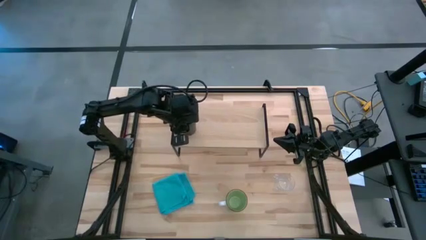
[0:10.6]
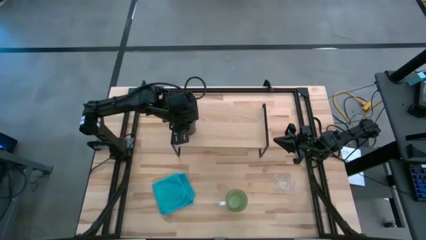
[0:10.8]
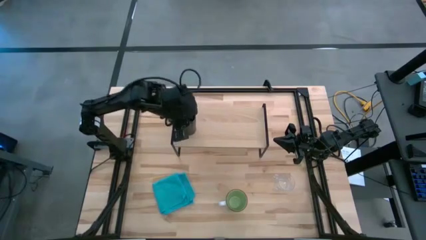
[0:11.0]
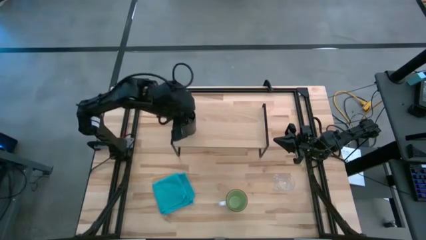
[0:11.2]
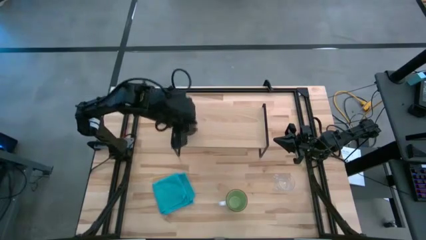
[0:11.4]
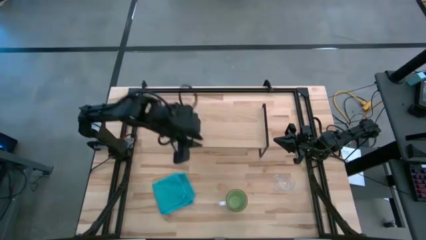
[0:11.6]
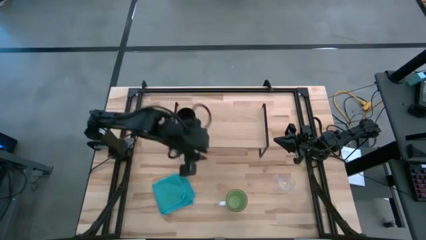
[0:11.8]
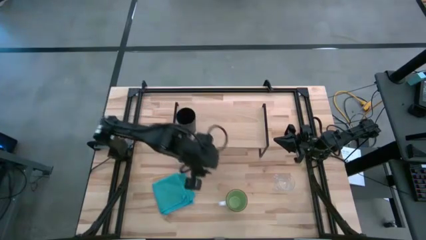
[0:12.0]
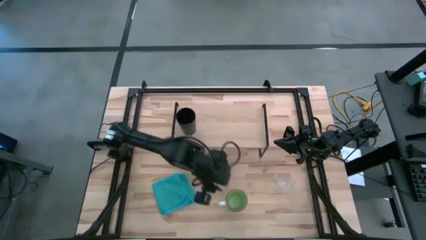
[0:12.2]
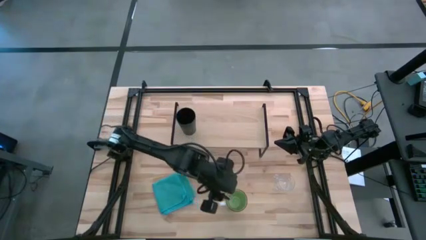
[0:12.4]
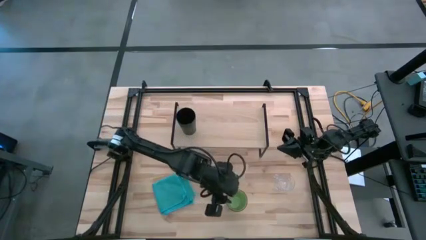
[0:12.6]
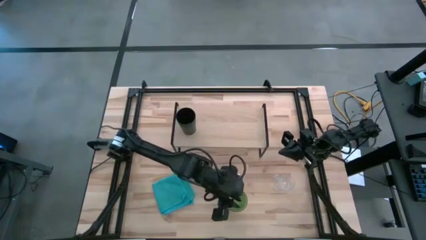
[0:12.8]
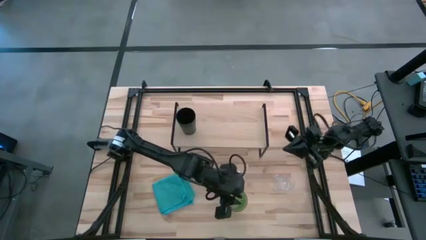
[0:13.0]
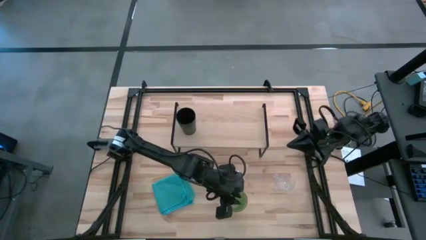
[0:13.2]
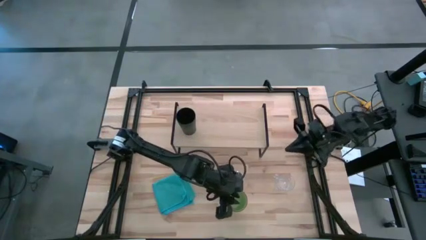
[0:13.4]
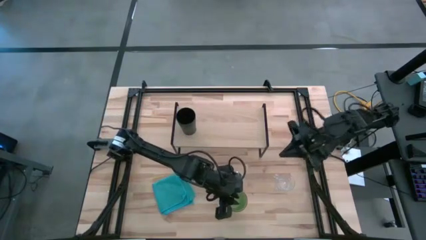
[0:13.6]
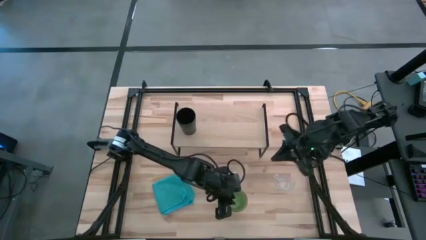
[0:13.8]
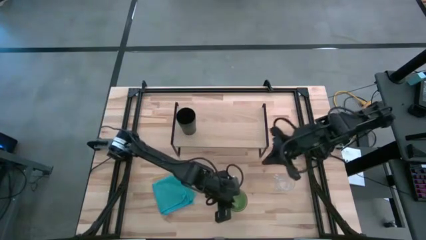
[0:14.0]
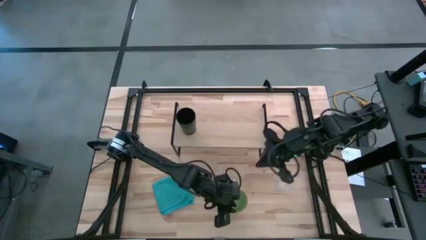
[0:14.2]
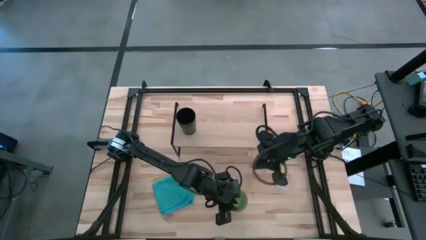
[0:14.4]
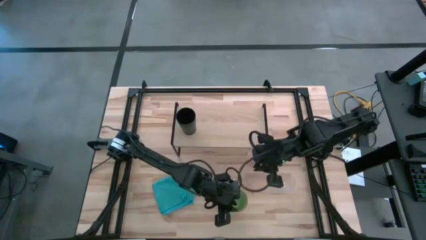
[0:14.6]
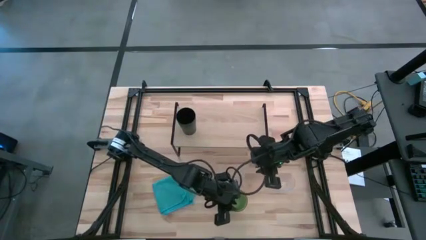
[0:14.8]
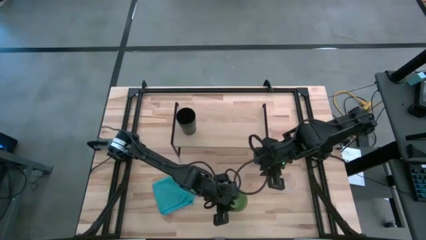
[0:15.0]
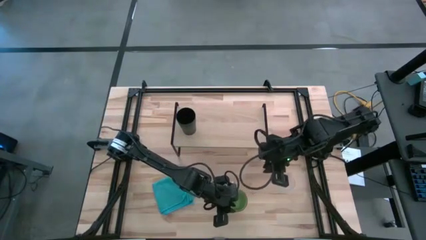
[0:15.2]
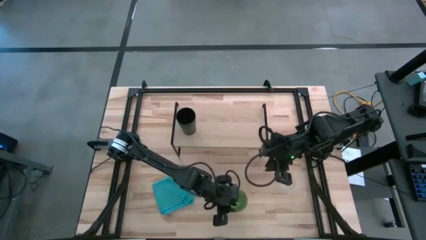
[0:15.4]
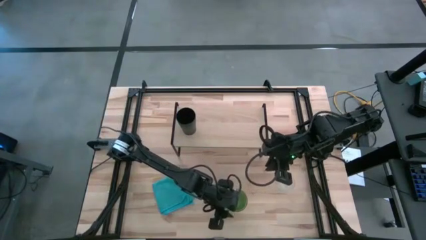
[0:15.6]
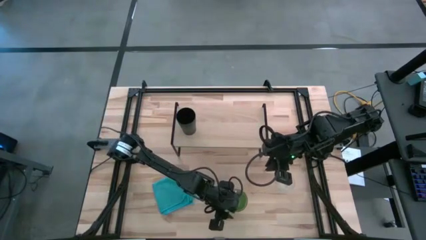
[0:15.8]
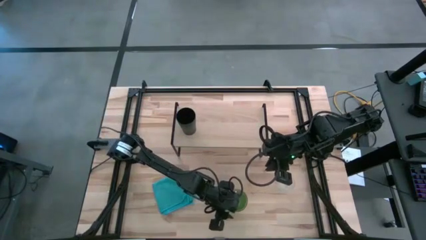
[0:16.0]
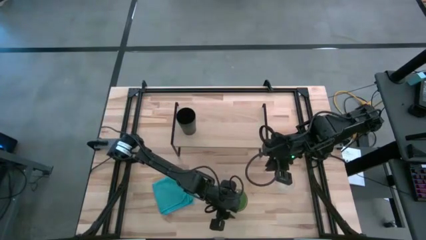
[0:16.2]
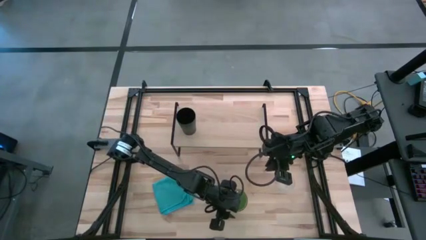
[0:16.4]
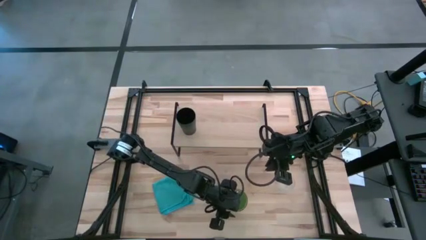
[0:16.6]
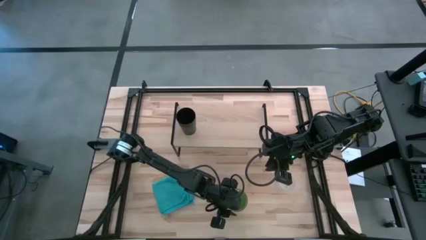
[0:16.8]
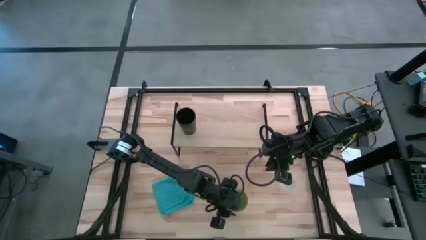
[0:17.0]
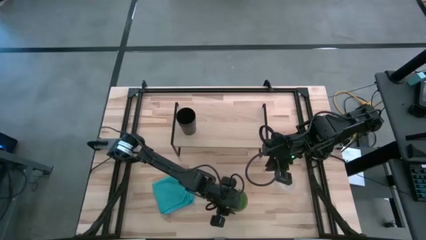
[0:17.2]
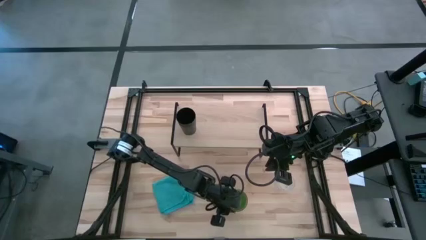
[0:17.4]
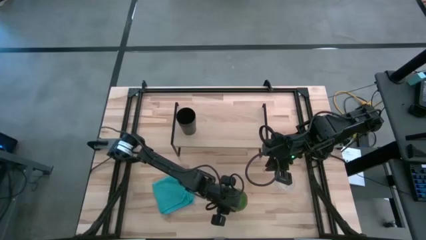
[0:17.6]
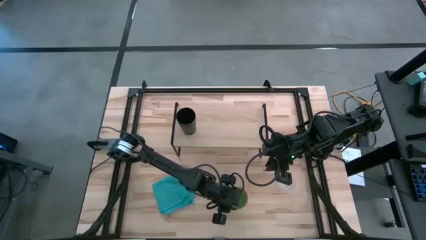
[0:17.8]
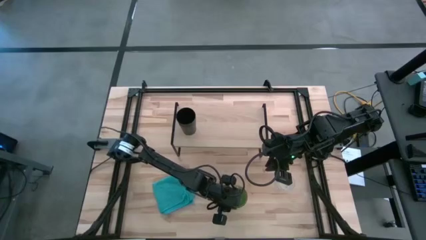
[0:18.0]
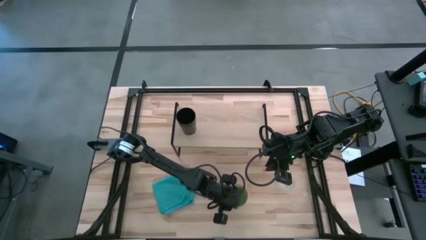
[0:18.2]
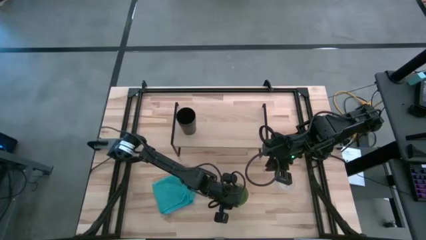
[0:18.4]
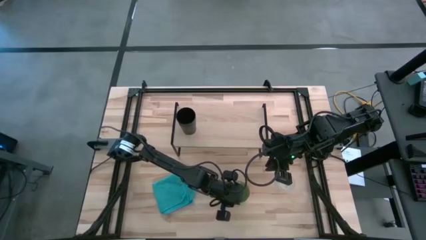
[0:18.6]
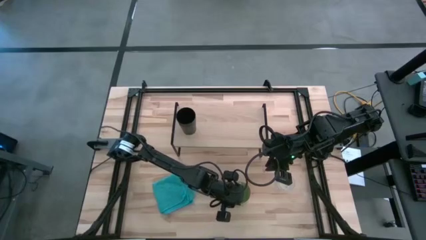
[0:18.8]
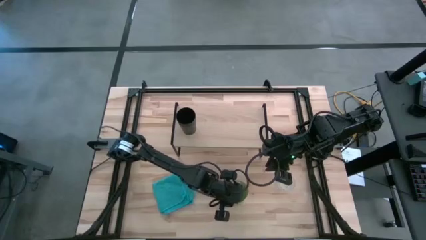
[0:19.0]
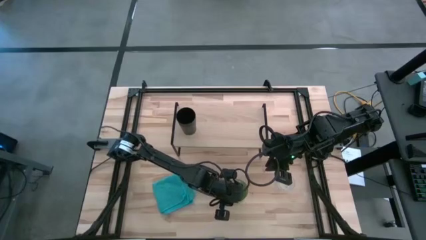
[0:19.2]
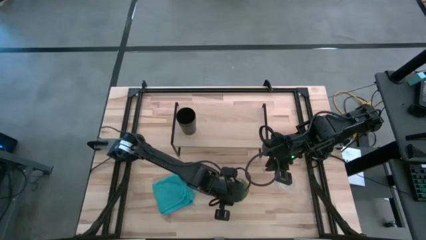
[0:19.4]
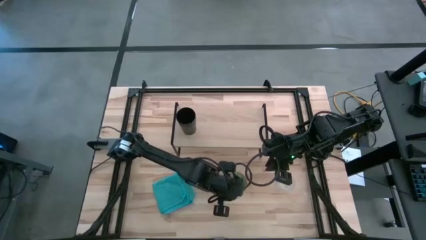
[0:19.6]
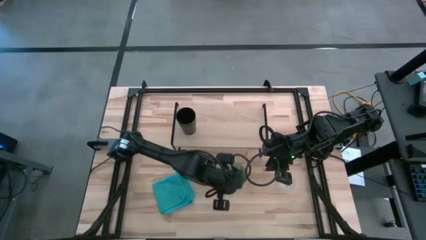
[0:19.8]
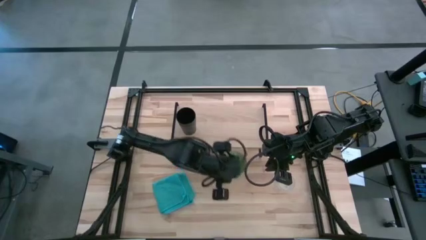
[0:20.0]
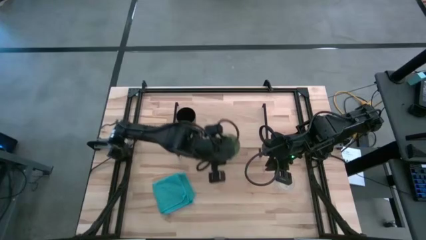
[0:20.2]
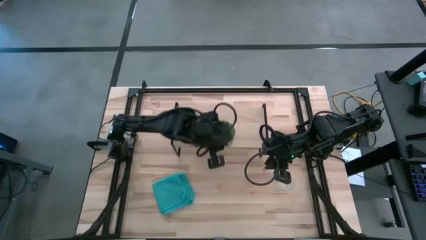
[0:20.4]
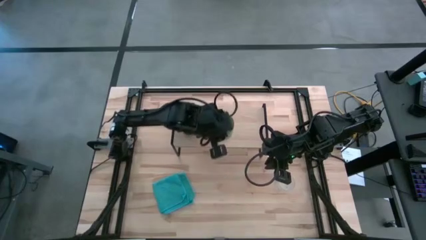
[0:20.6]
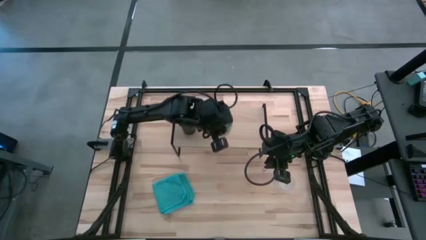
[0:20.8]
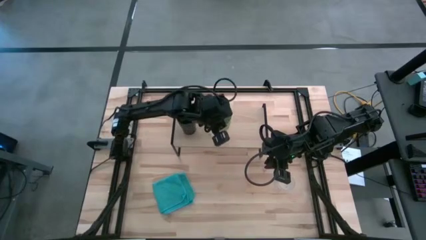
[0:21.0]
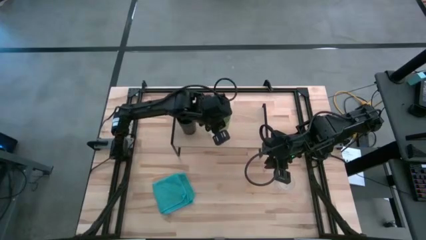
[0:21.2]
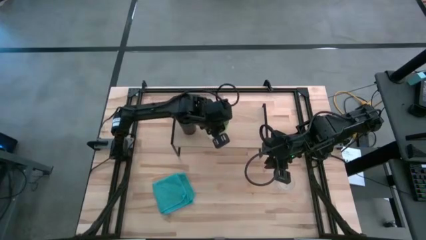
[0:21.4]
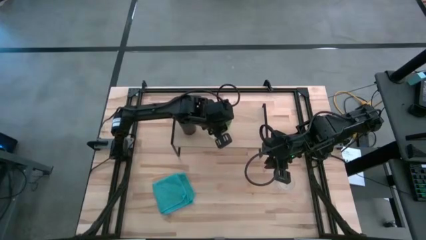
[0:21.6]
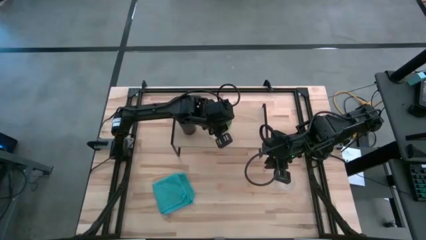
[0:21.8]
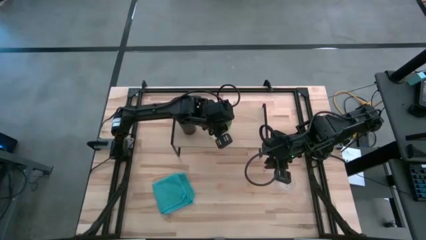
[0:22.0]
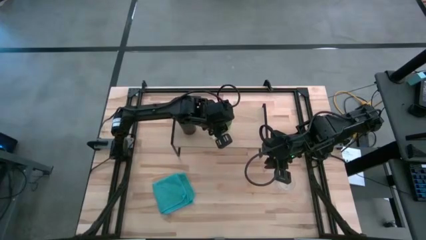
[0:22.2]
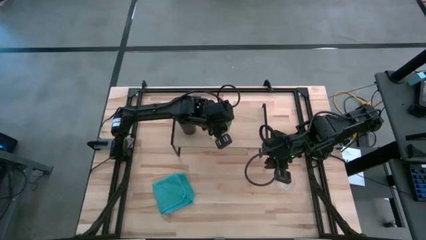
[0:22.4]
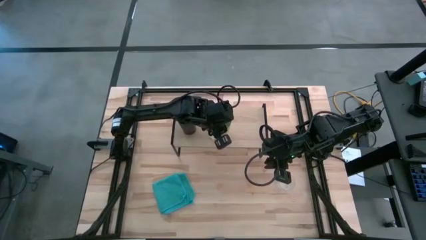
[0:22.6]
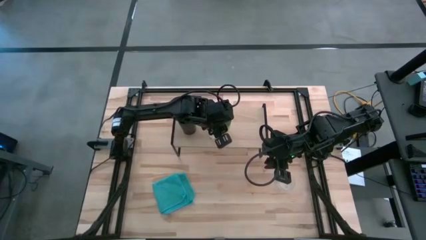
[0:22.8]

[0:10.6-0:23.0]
Task: Stack small to large cups/mugs on shelf
Put the green mug on the shelf
